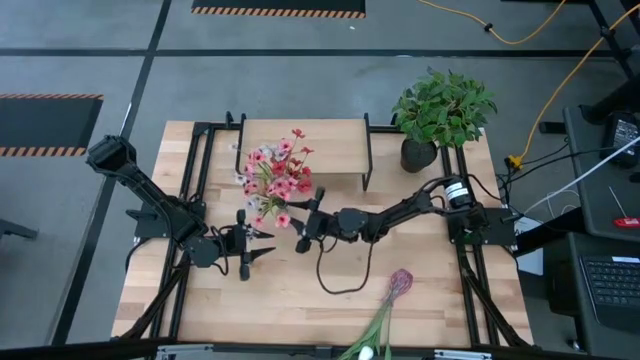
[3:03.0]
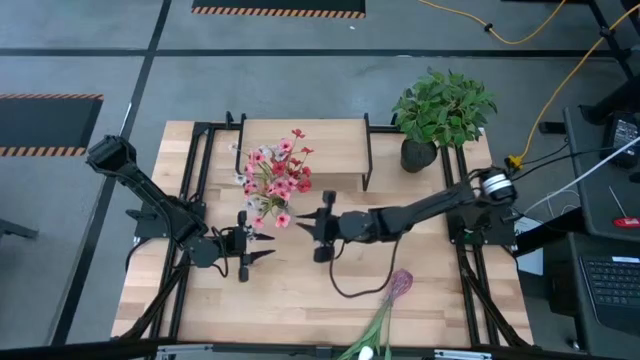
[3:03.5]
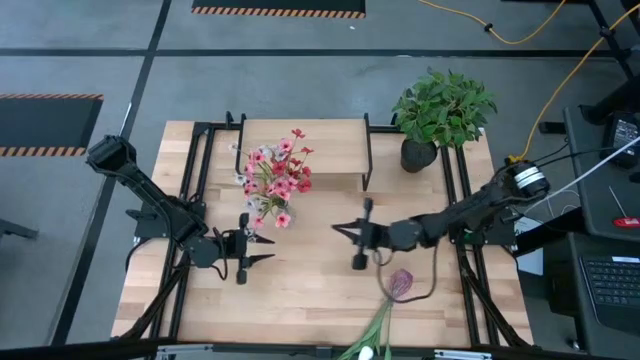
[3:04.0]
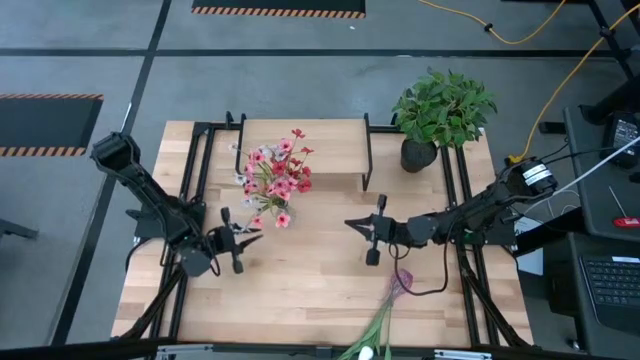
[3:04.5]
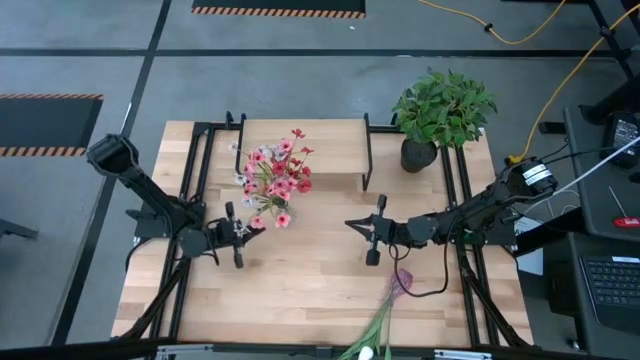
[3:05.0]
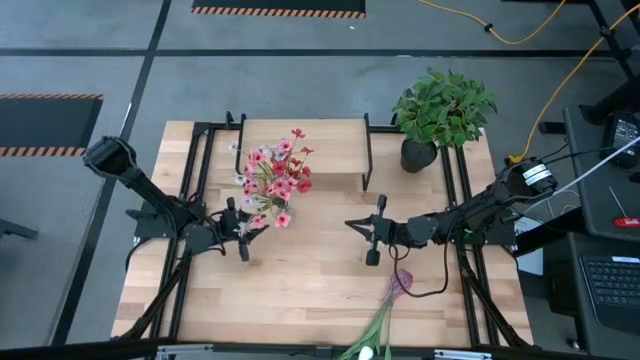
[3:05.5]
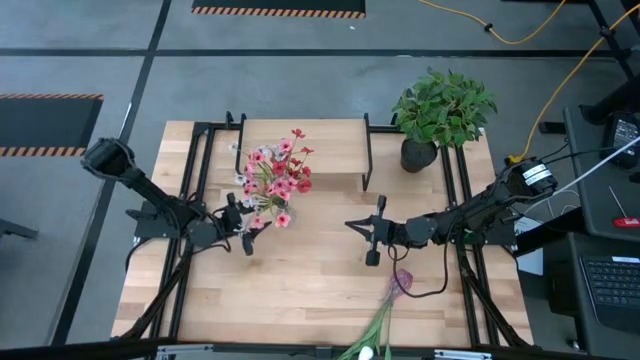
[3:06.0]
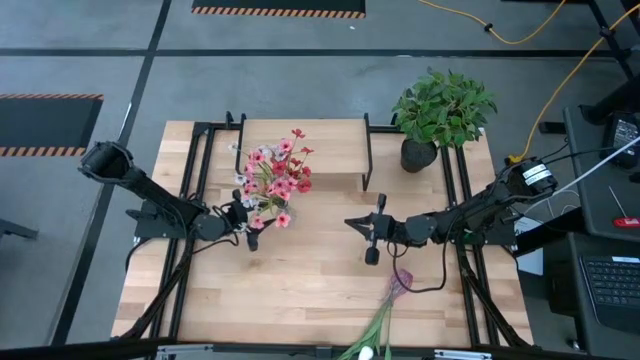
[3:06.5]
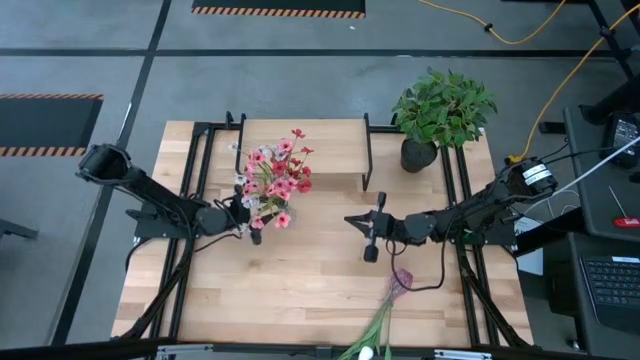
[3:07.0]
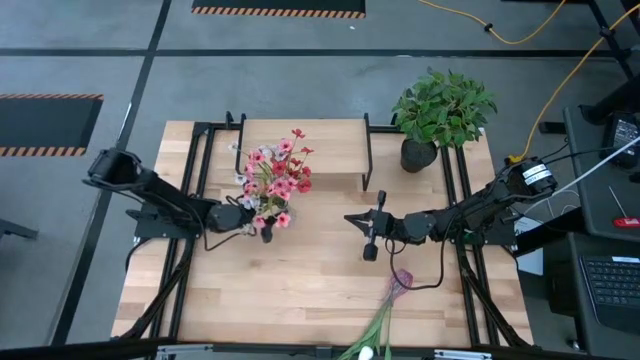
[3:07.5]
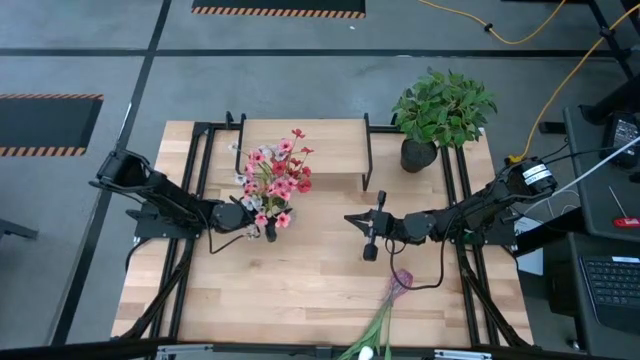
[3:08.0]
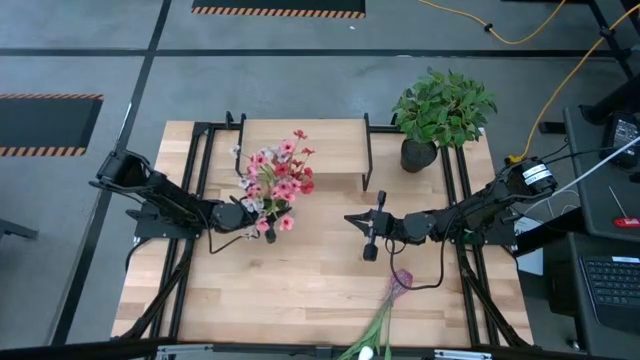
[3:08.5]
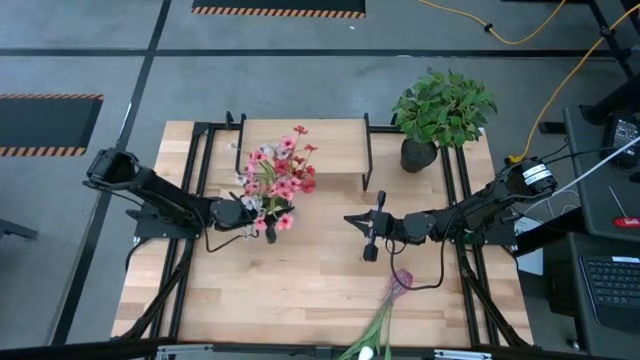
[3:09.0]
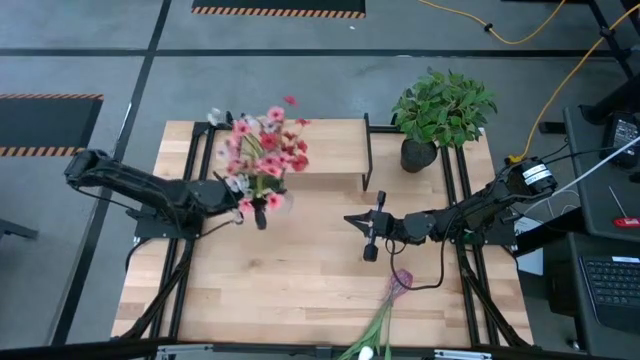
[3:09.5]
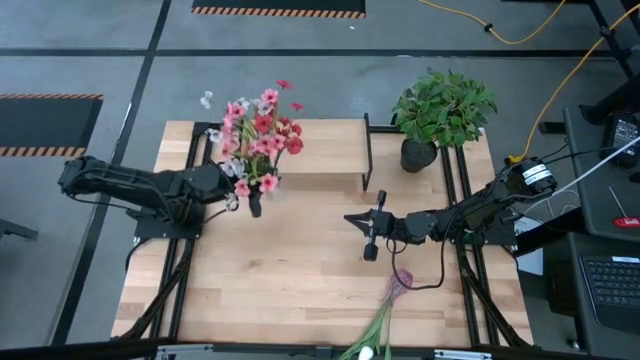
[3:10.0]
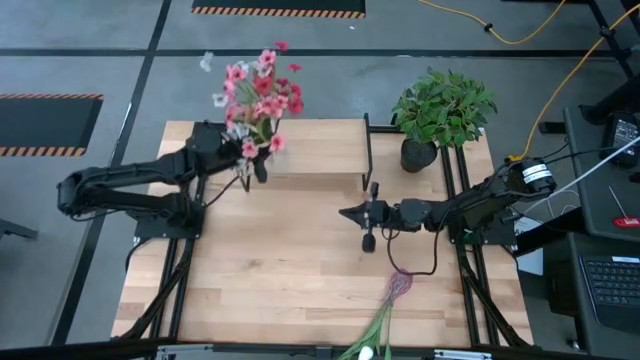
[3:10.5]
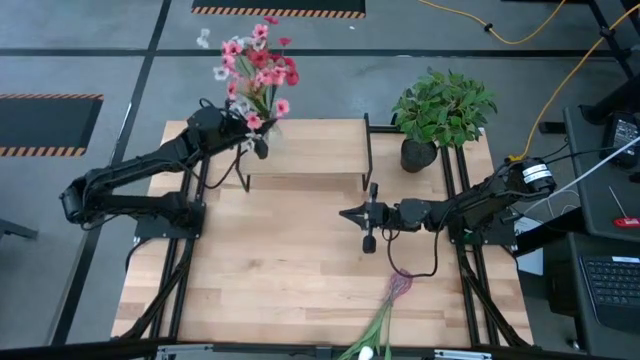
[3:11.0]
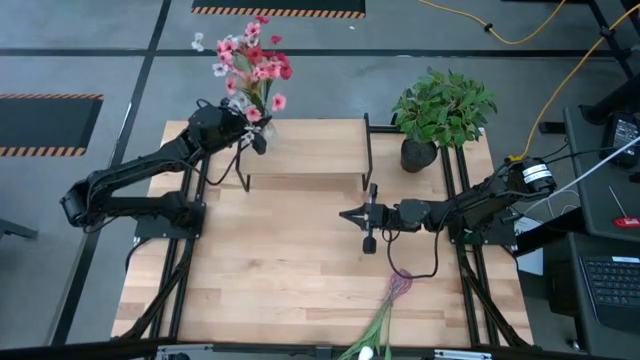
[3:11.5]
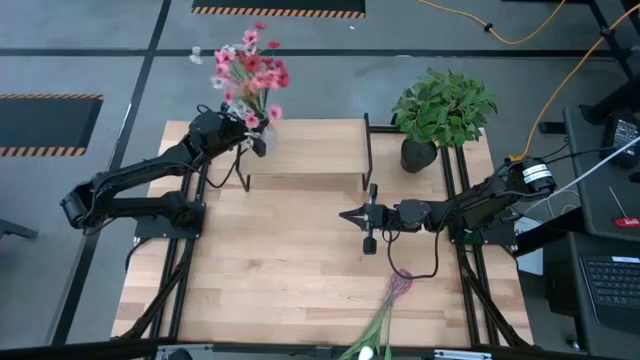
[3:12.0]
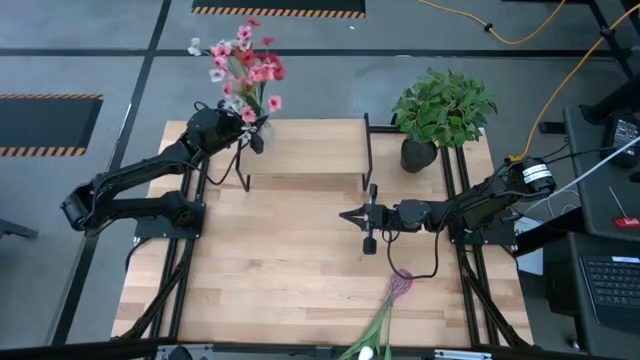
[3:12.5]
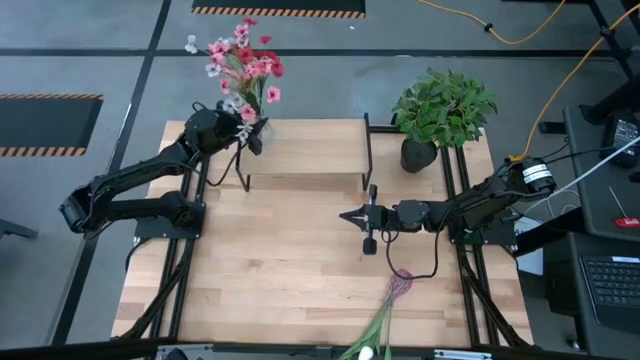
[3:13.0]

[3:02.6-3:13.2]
Task: Pick and place flowers into a vace then onto a shelf
Put the transparent vase on the shelf

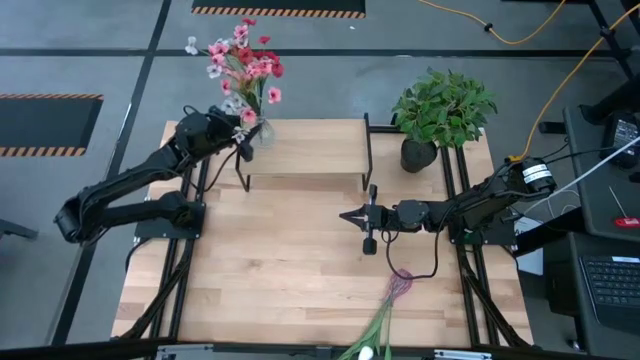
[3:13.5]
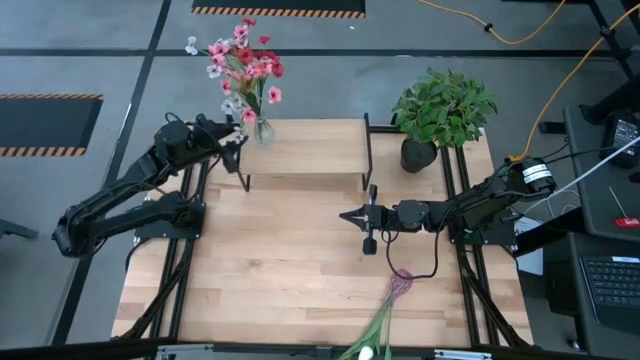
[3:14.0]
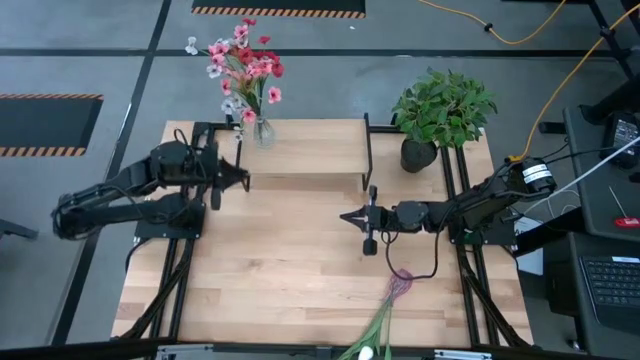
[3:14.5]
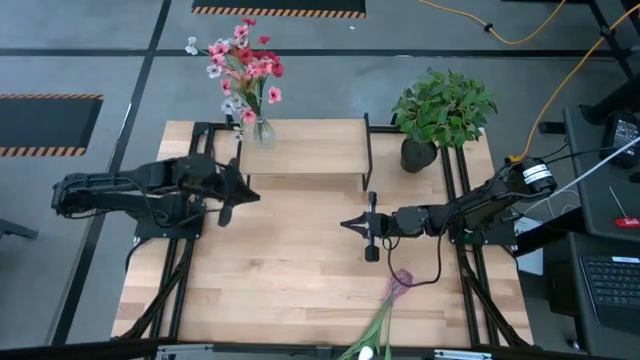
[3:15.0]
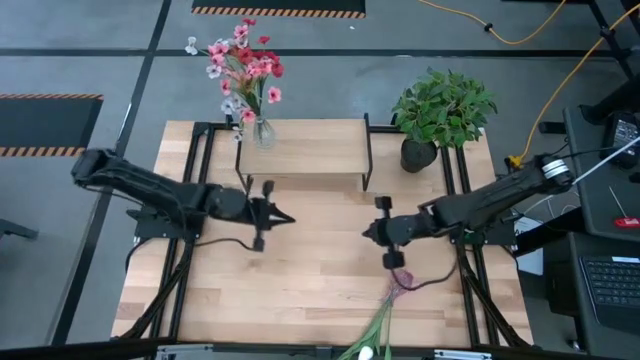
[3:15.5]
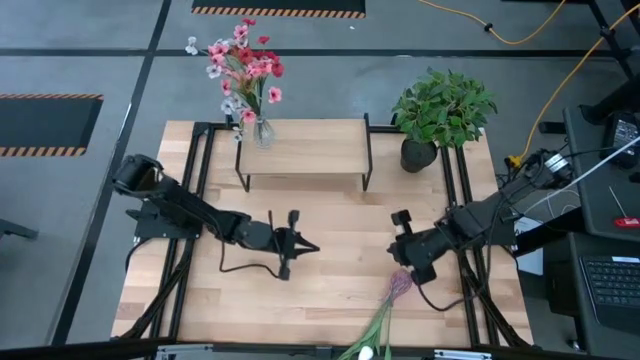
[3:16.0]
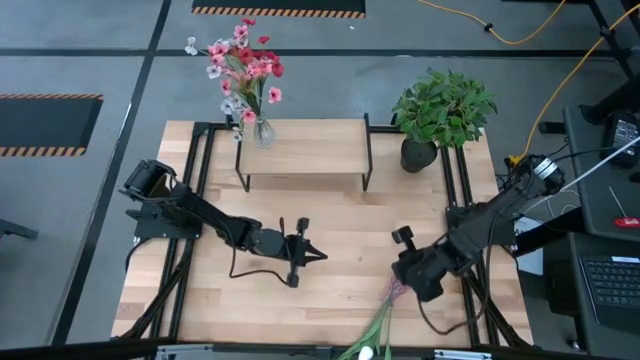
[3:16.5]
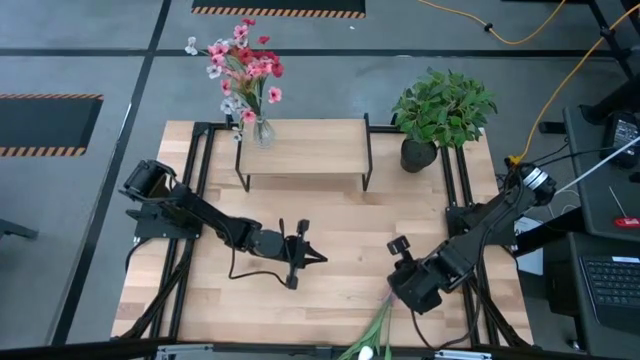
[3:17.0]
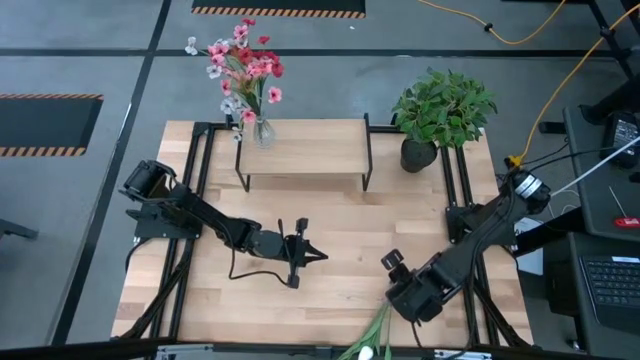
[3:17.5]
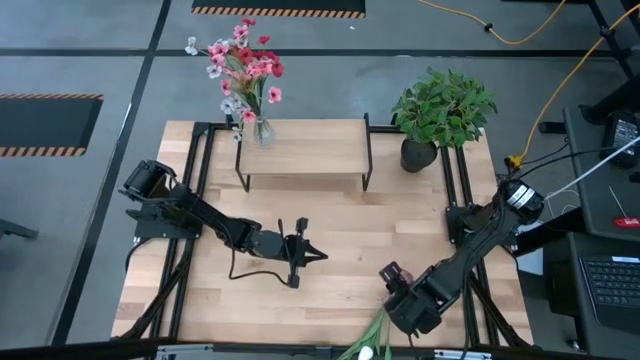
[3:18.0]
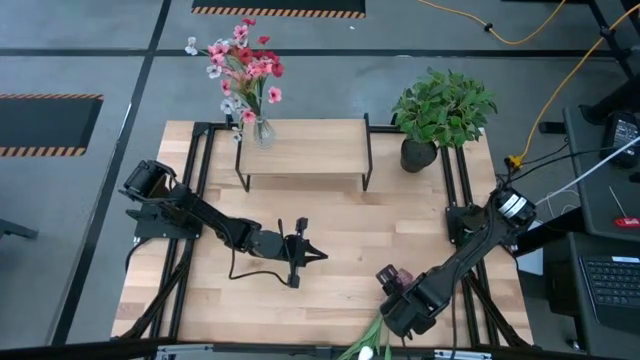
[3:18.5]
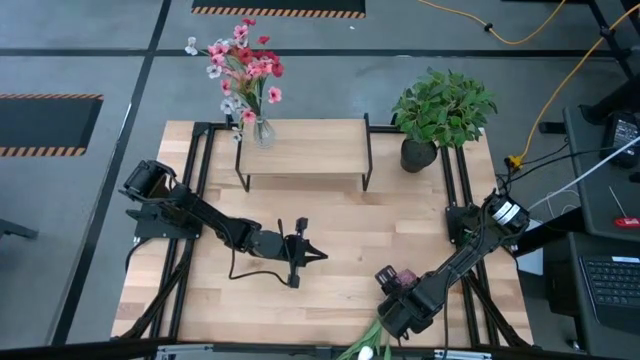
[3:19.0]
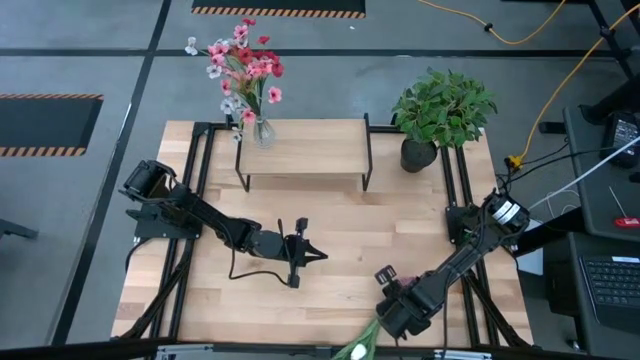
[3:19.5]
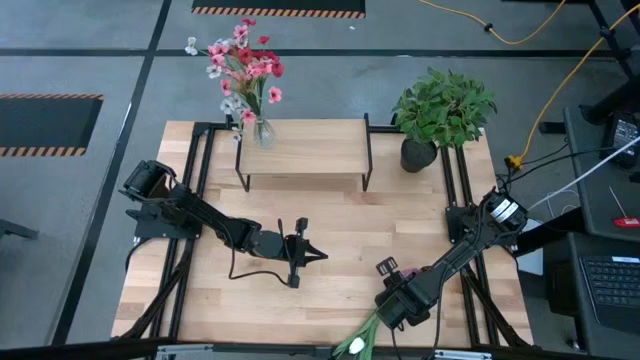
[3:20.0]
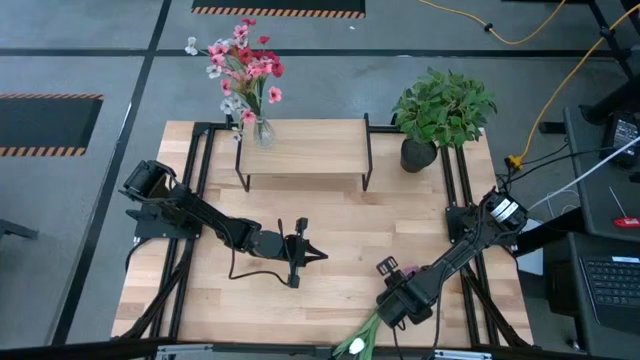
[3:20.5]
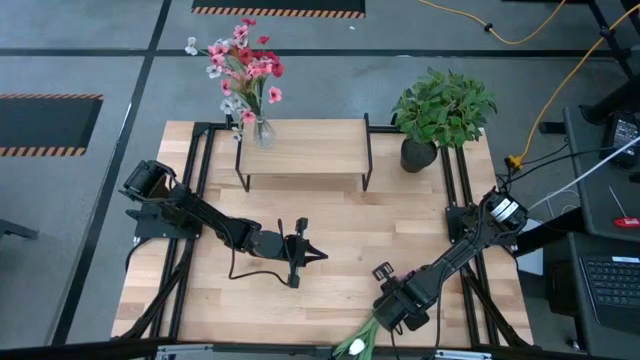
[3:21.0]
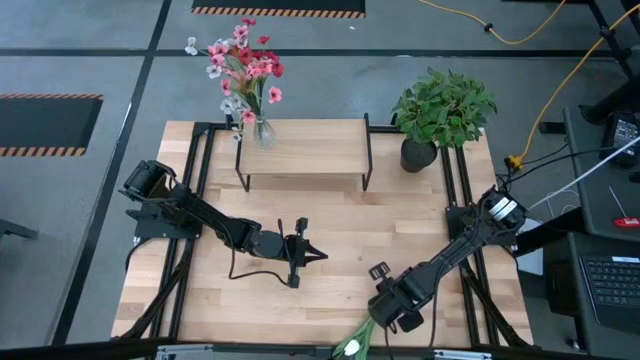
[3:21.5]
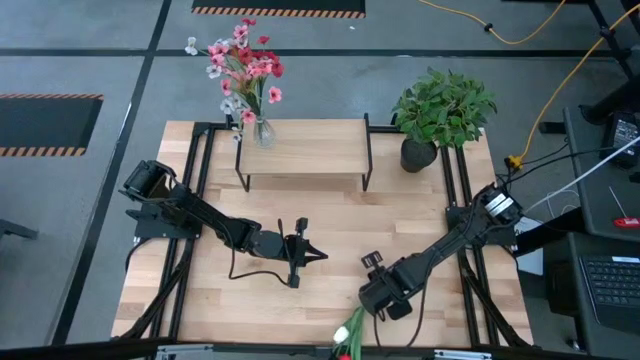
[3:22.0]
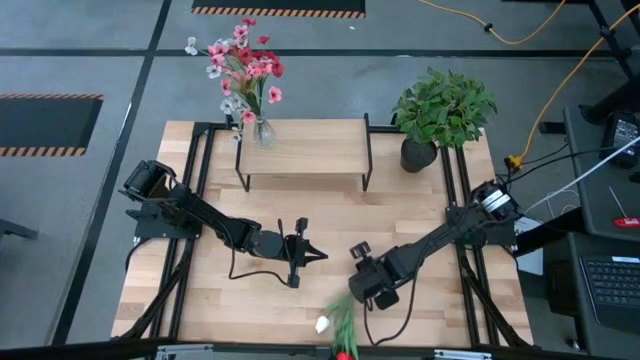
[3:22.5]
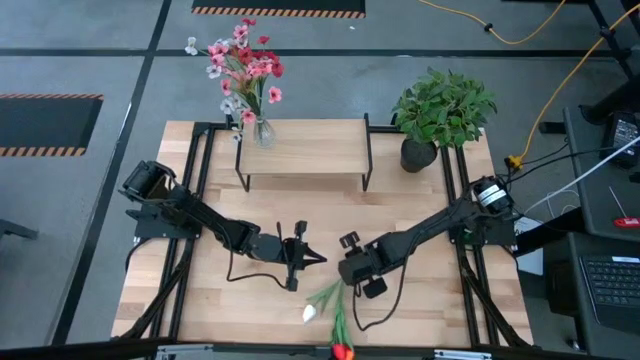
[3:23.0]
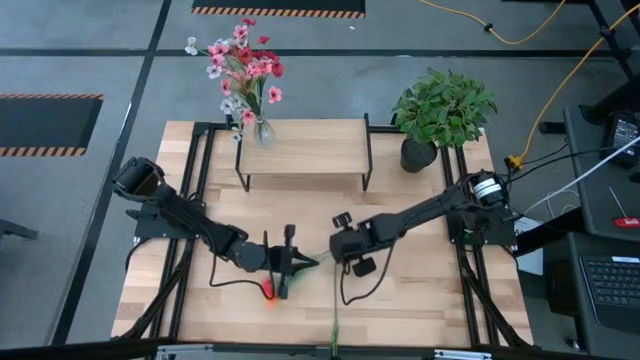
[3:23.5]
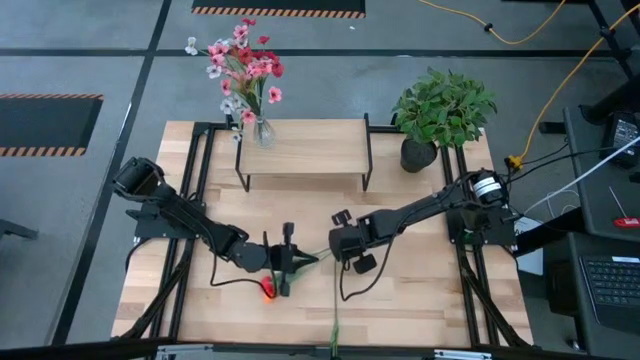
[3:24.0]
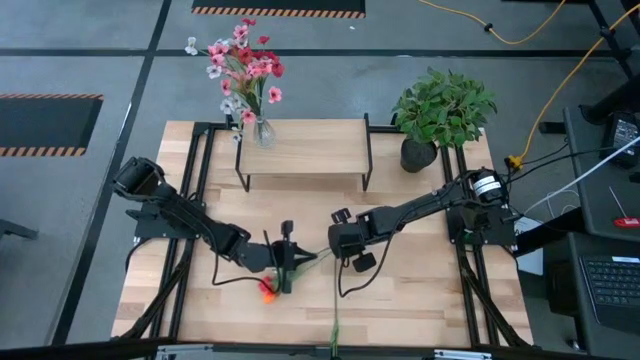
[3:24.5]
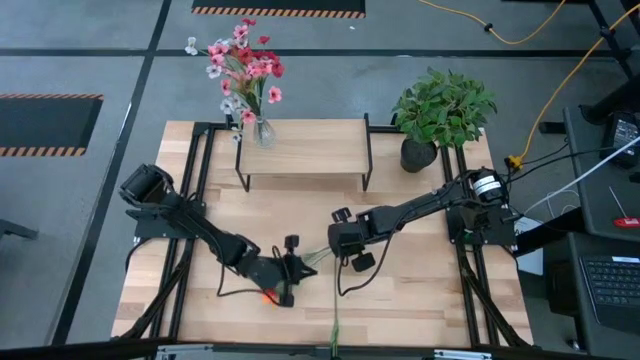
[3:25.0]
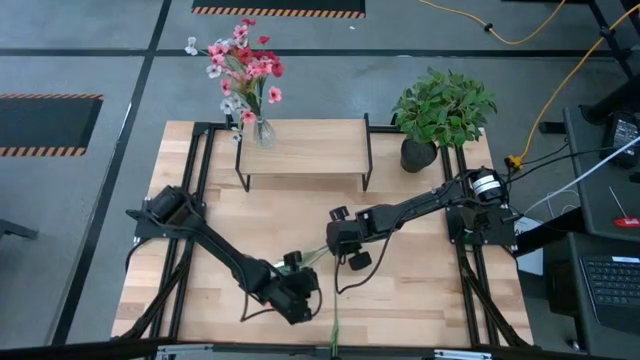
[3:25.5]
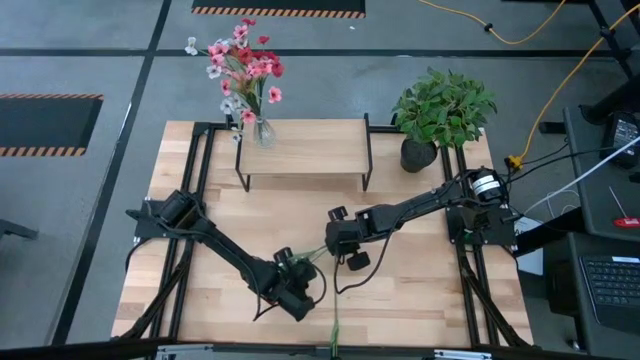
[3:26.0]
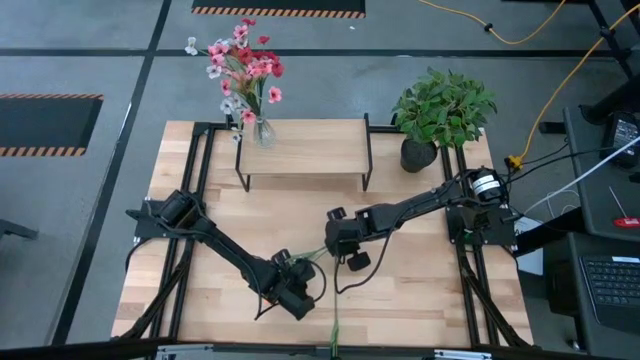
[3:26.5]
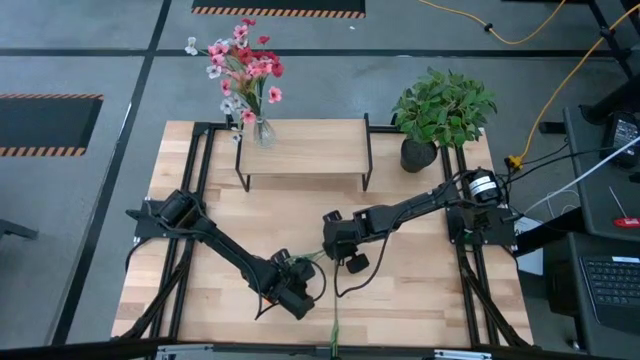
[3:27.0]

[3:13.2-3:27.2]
Move the pink vase to the middle of the table
